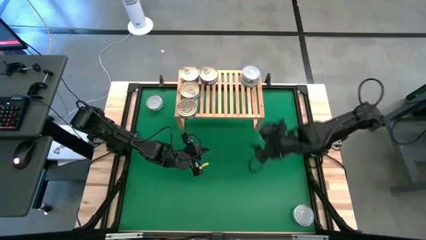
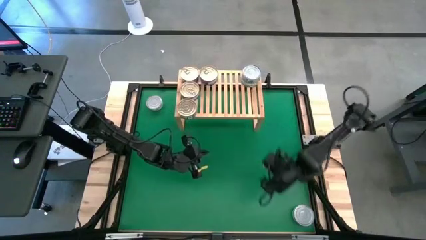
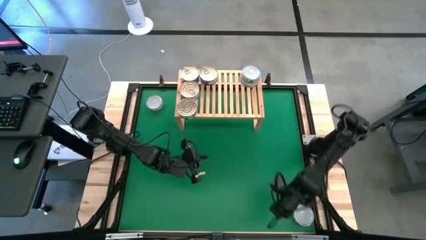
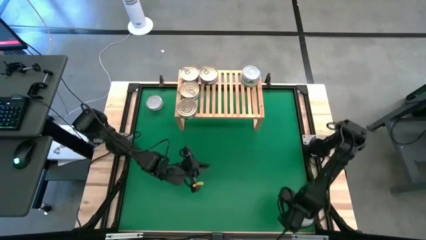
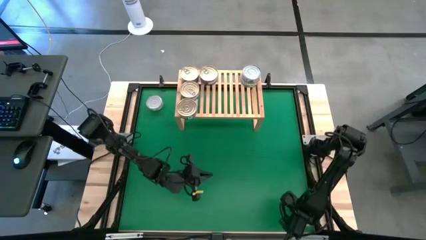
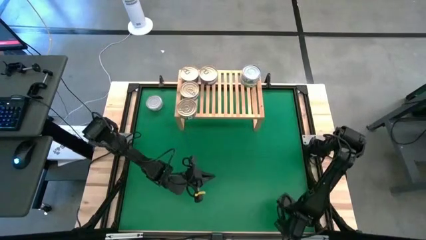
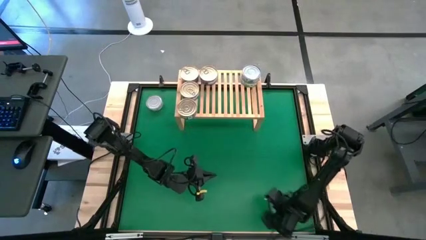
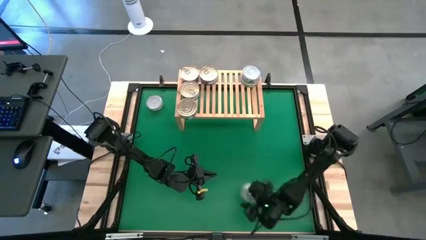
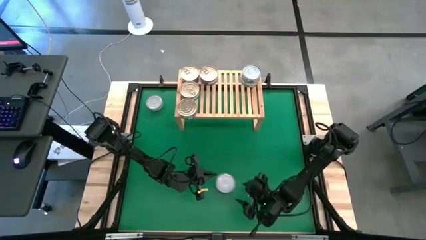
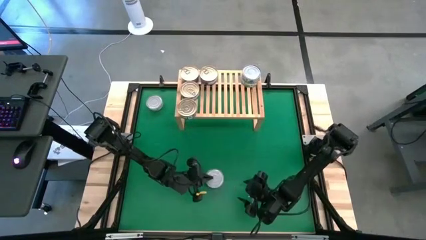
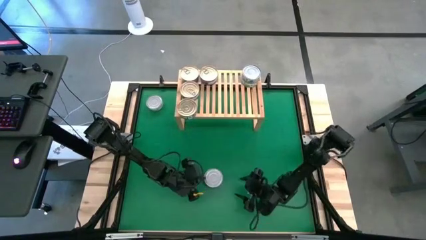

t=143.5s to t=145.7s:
Task: Stack canned seafood by type on shelf
Move the bottom green tuna can to the center of the table

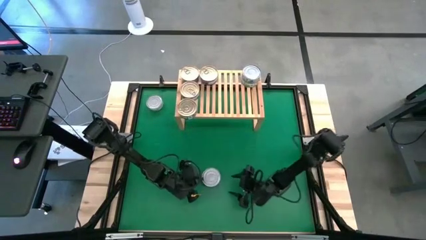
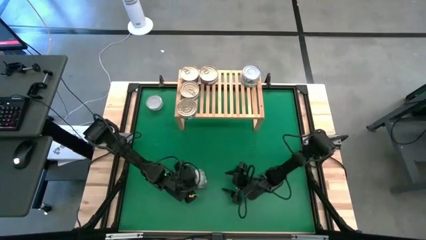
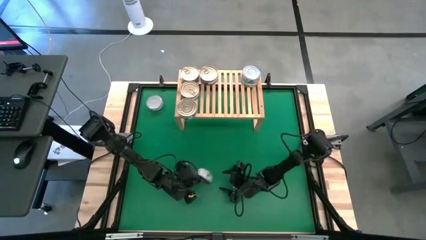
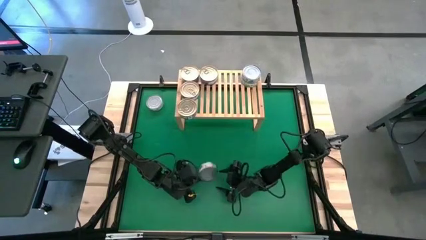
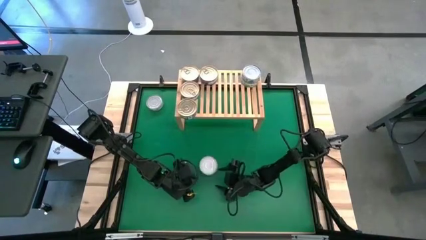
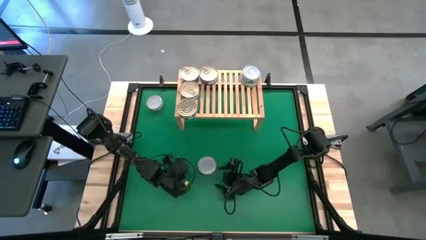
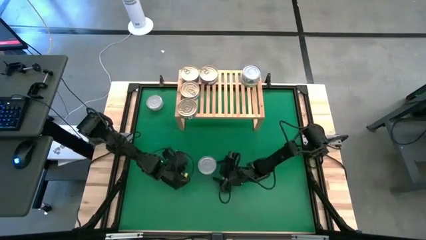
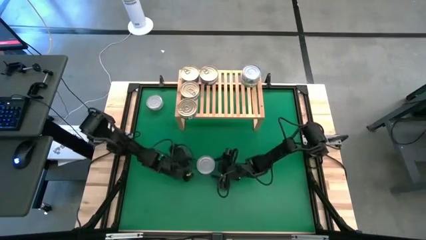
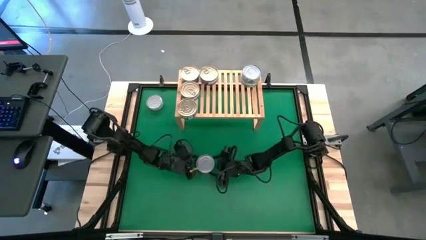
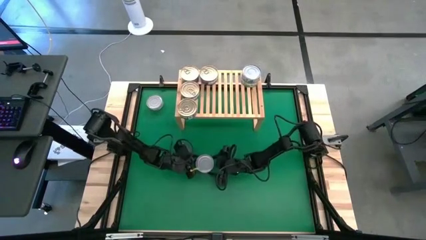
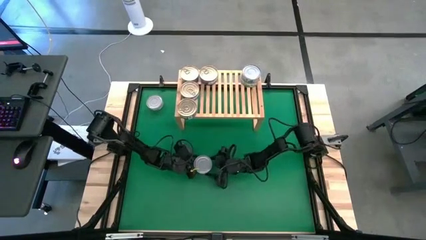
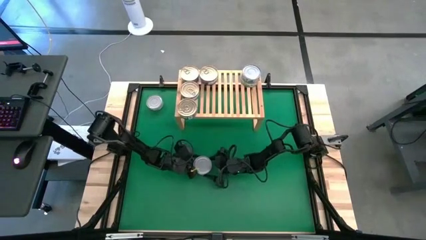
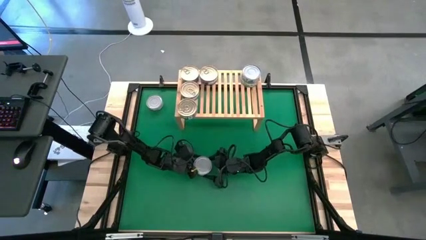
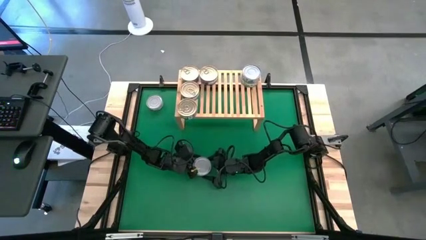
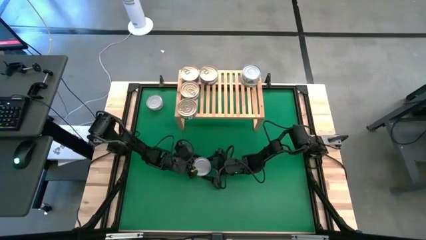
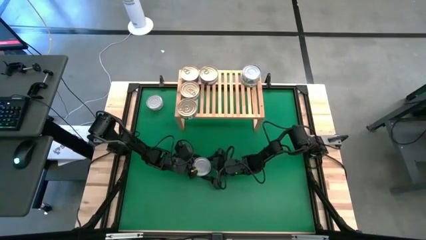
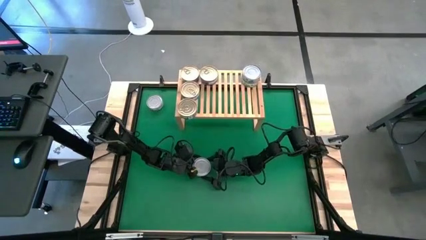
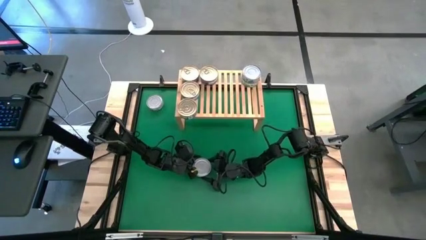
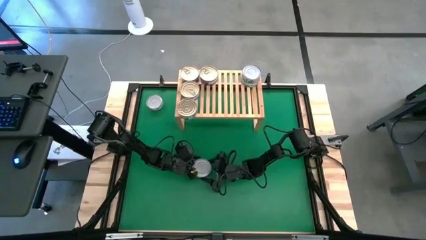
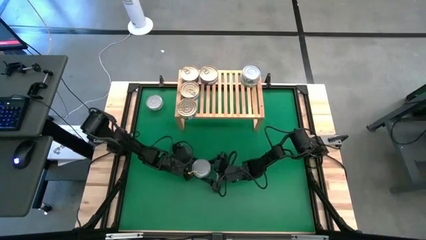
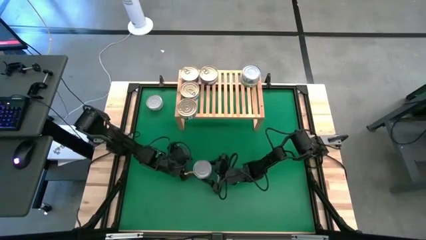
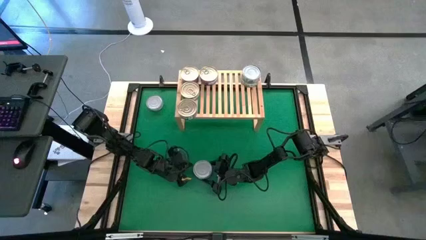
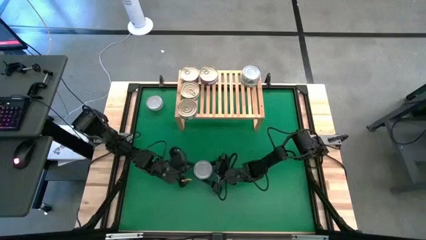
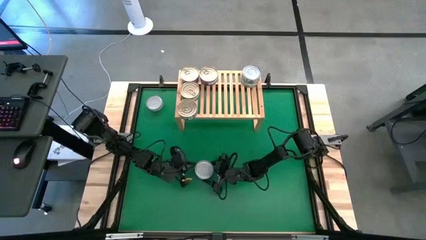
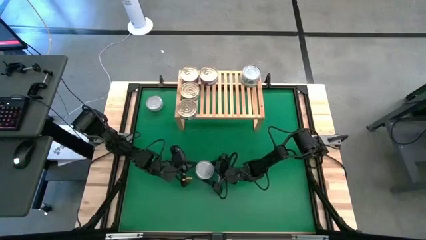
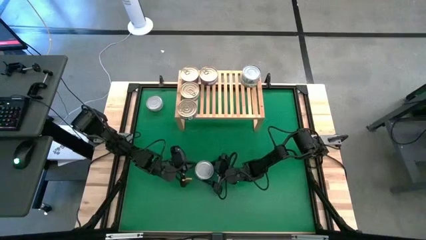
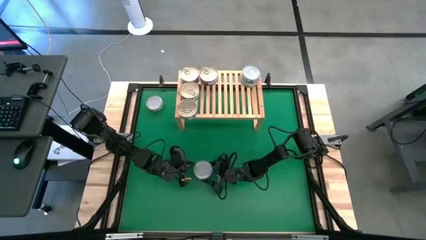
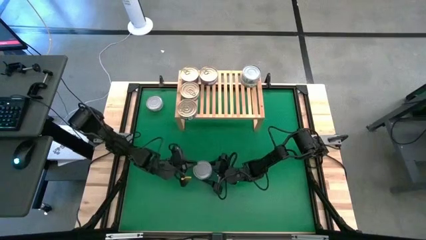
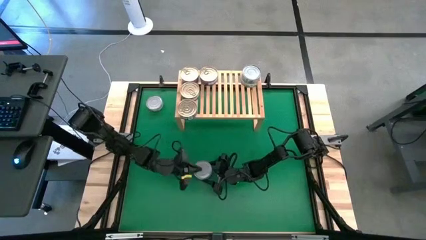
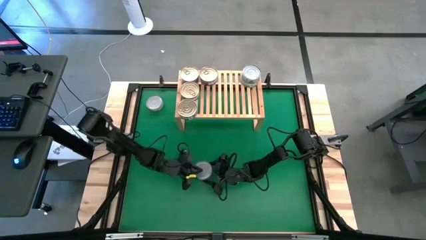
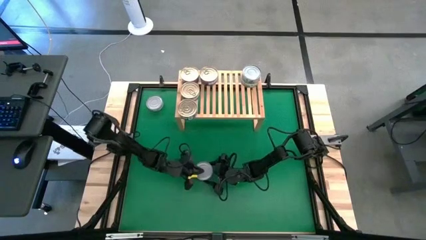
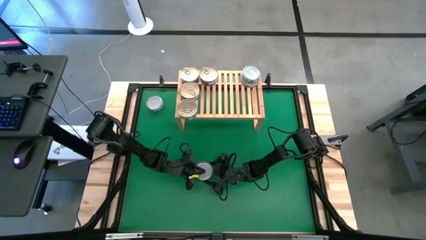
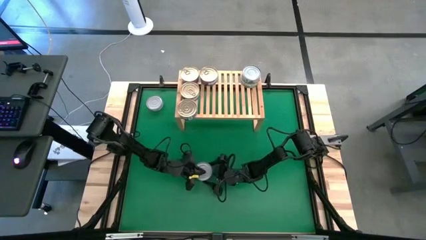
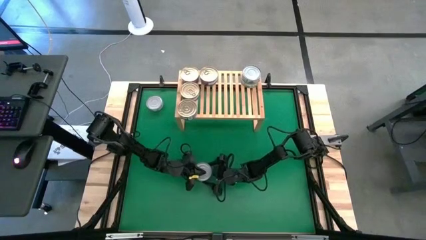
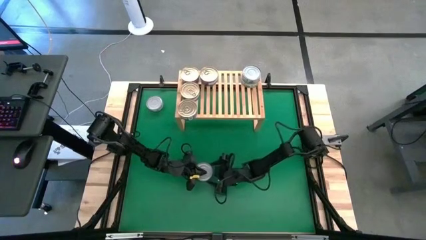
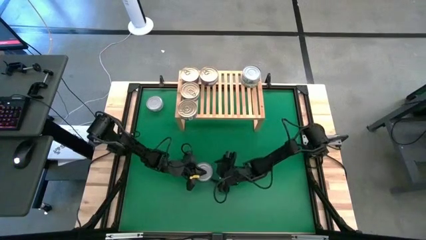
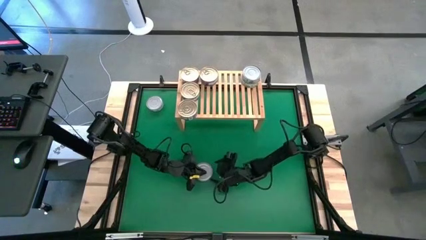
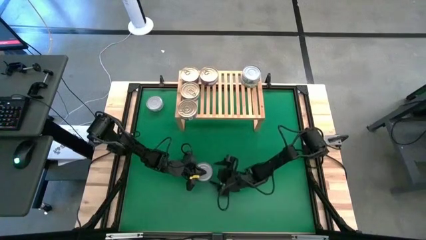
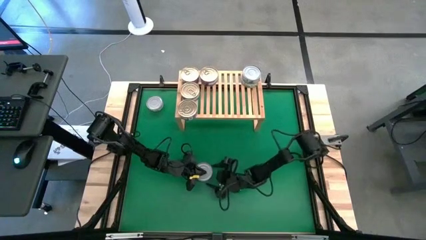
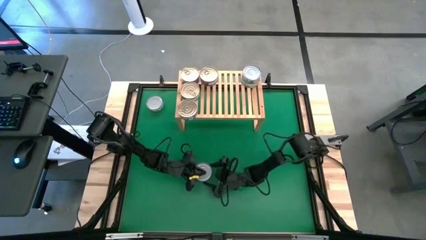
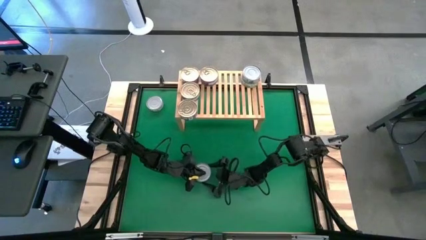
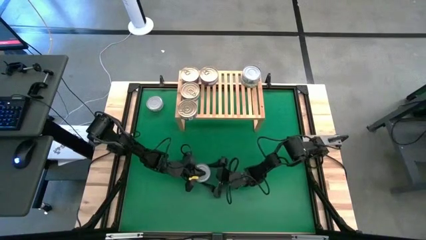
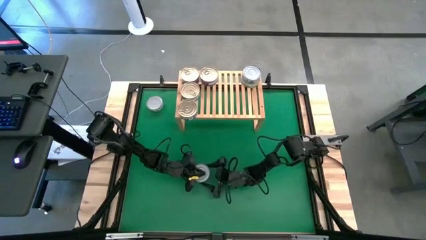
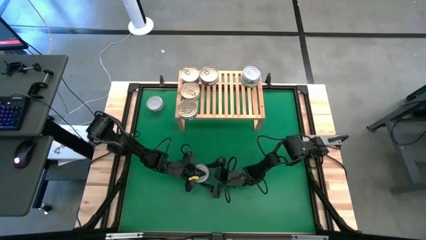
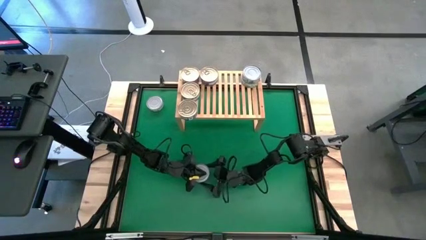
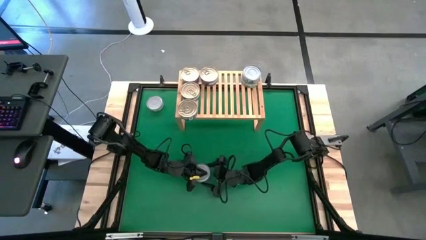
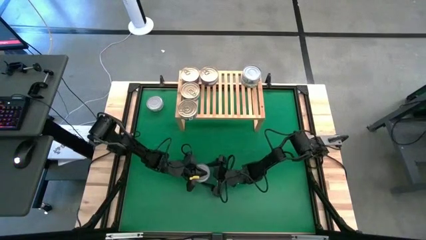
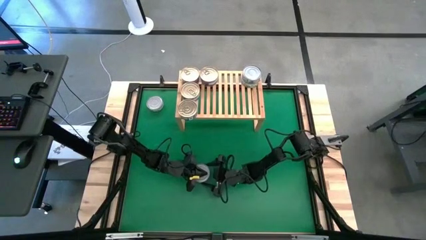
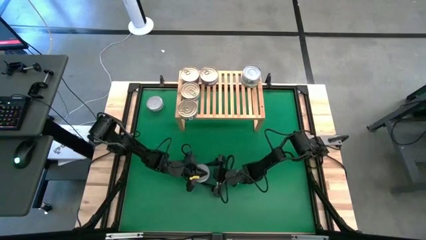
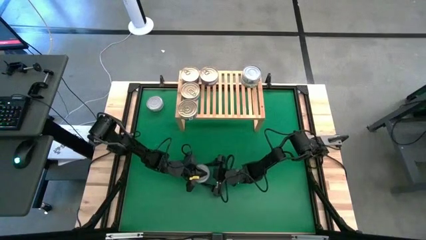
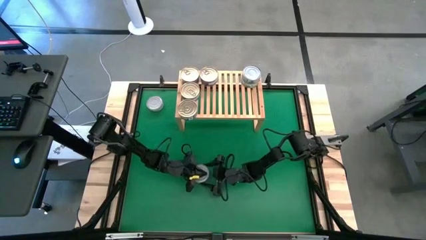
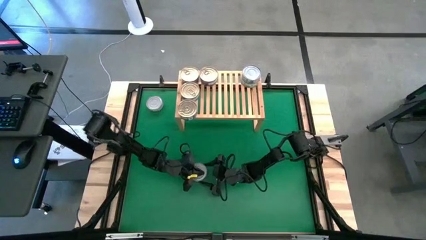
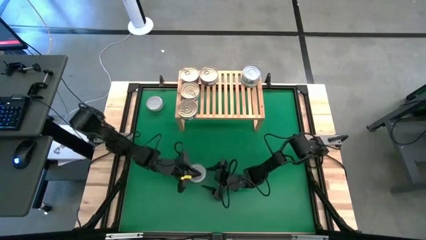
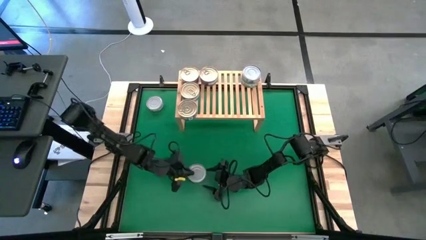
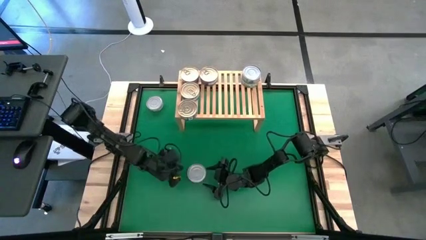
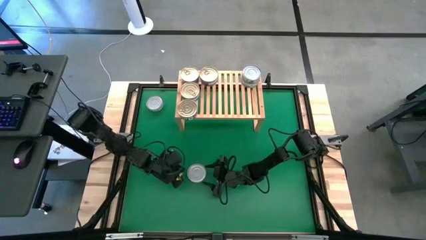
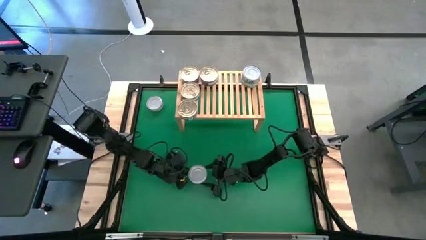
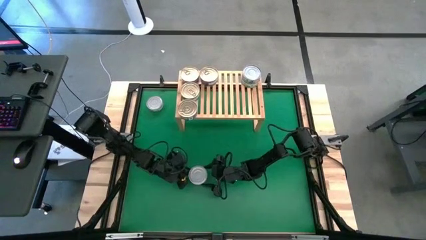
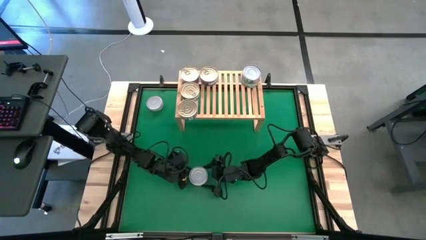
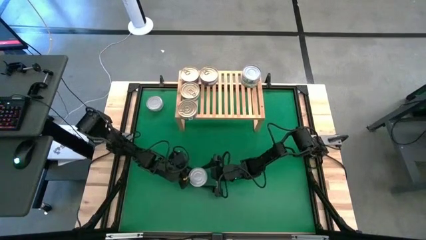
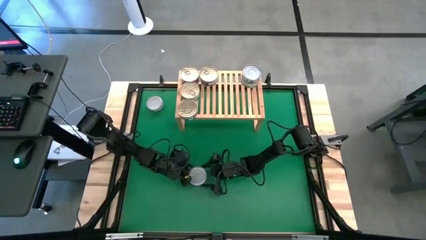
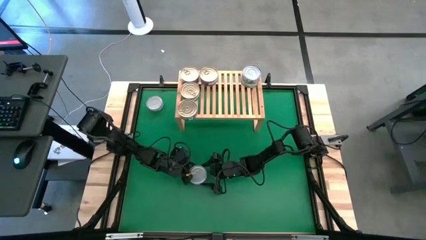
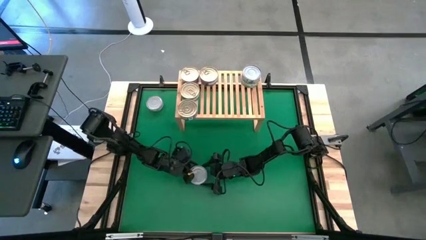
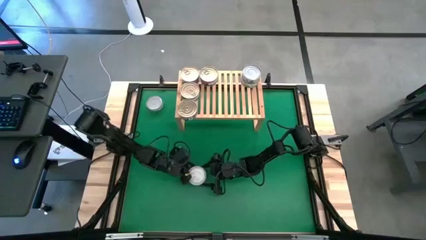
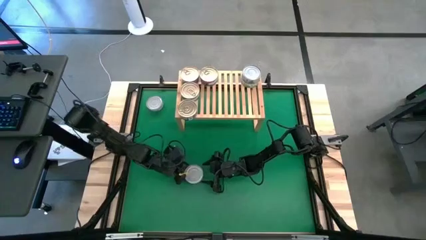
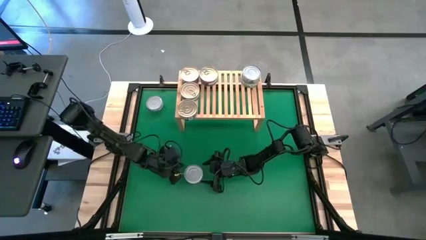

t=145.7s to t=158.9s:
Put the center green tuna can on the shelf aligned with the other green tuna can
